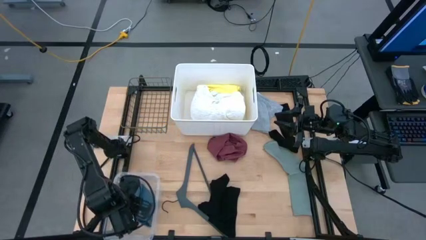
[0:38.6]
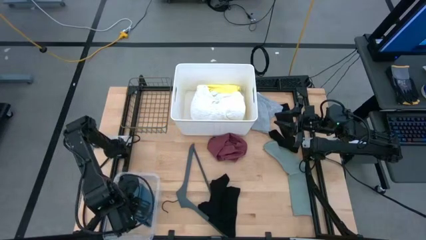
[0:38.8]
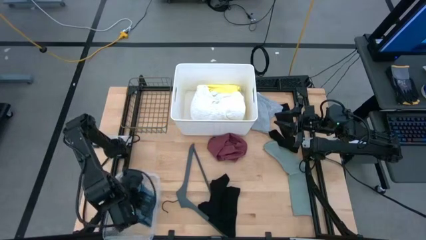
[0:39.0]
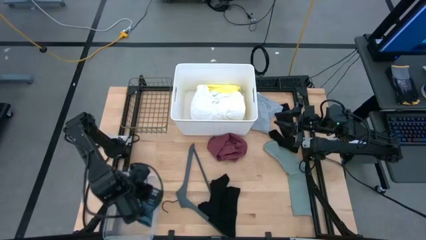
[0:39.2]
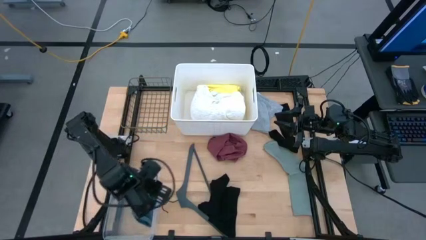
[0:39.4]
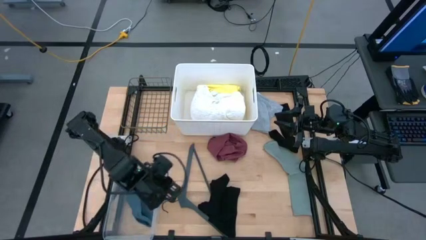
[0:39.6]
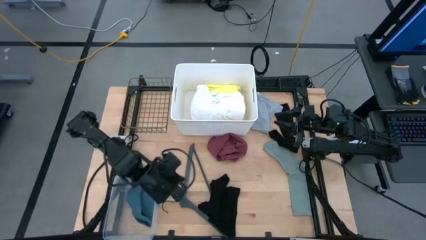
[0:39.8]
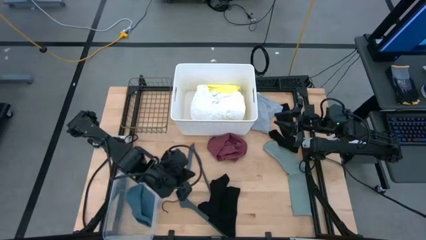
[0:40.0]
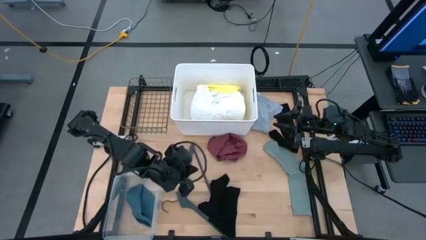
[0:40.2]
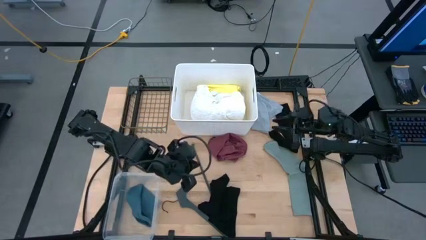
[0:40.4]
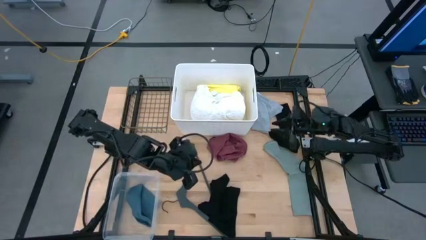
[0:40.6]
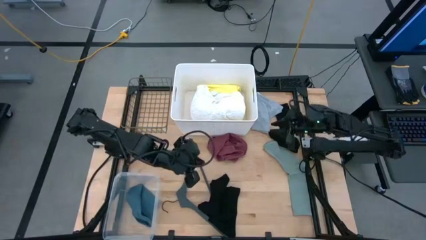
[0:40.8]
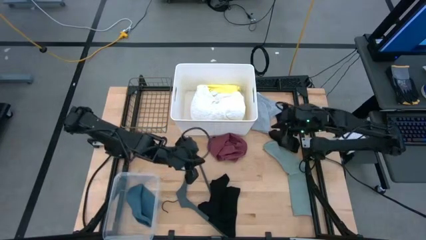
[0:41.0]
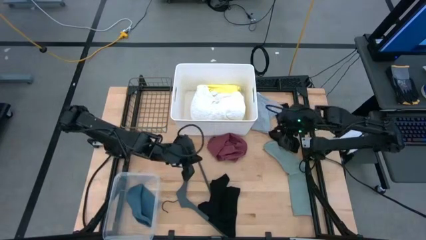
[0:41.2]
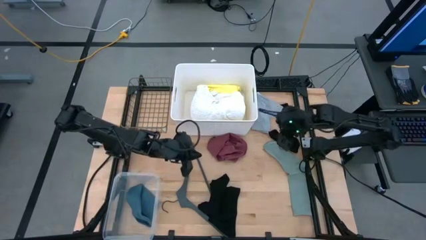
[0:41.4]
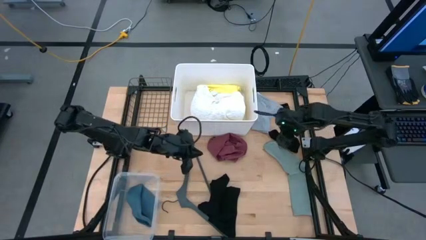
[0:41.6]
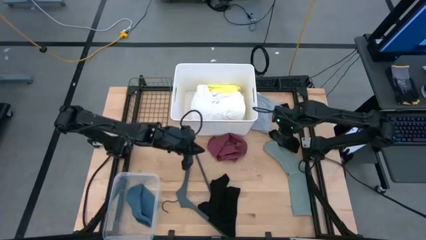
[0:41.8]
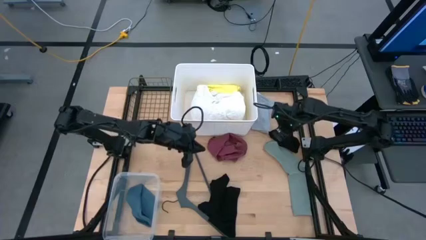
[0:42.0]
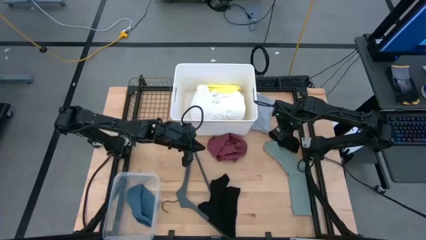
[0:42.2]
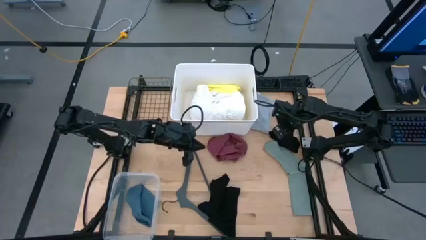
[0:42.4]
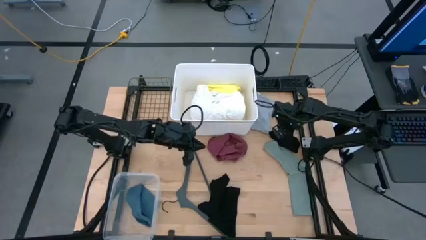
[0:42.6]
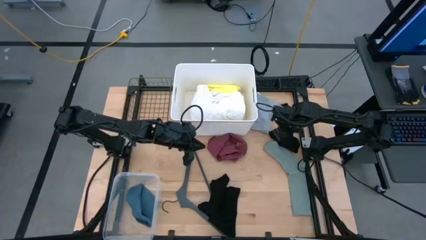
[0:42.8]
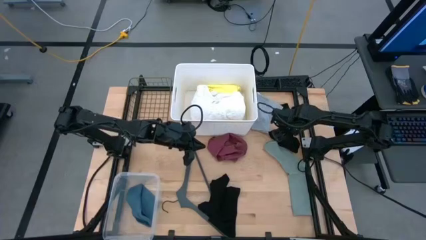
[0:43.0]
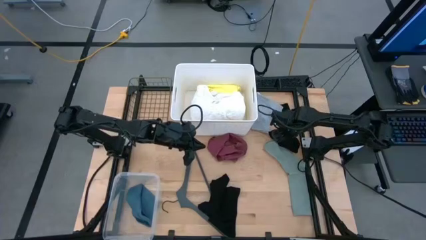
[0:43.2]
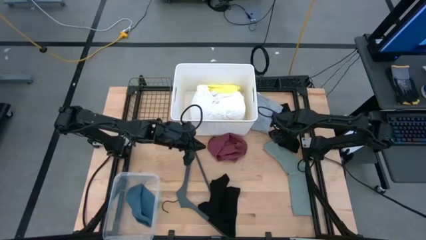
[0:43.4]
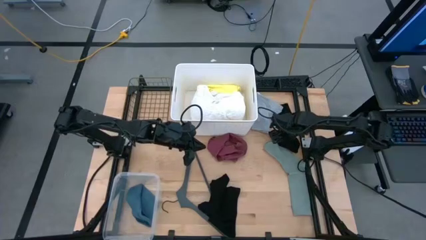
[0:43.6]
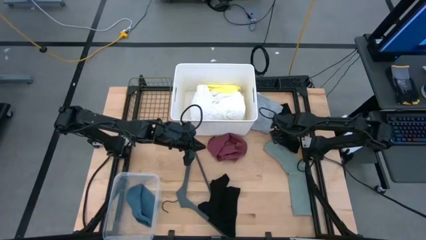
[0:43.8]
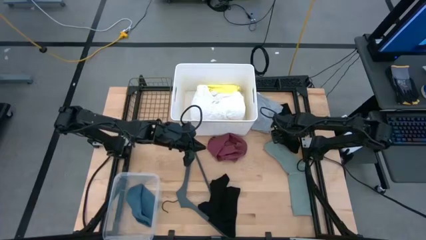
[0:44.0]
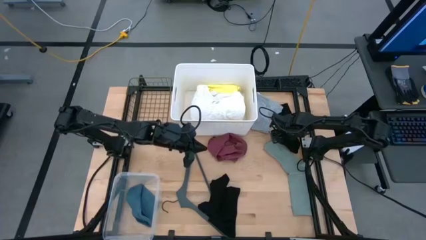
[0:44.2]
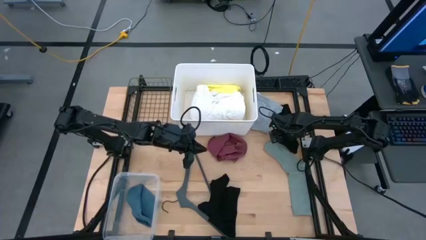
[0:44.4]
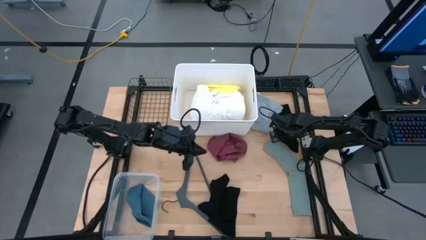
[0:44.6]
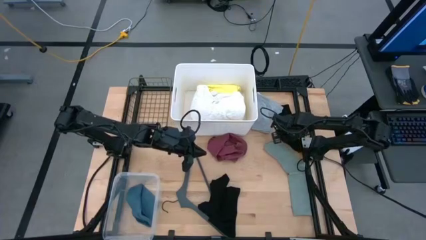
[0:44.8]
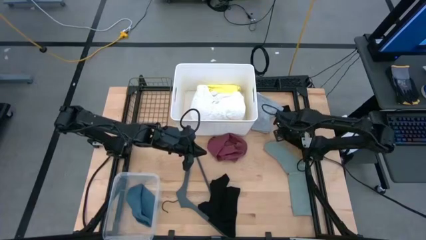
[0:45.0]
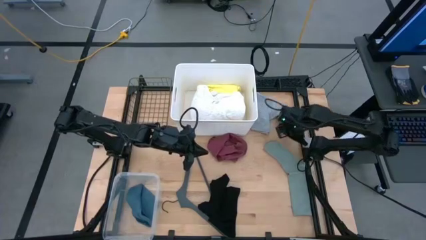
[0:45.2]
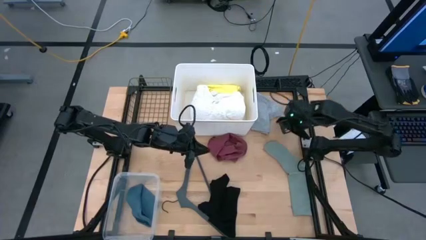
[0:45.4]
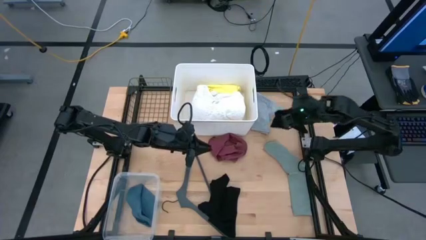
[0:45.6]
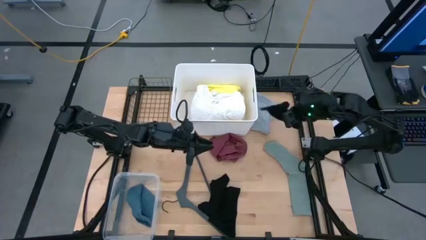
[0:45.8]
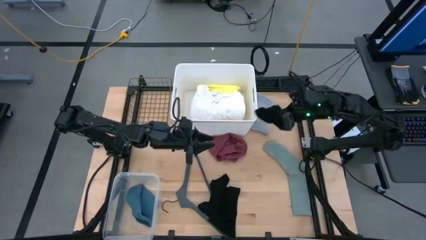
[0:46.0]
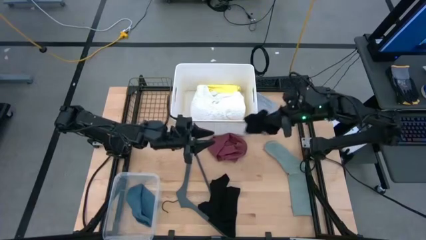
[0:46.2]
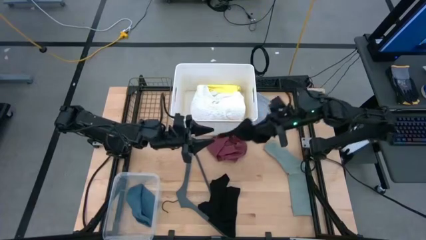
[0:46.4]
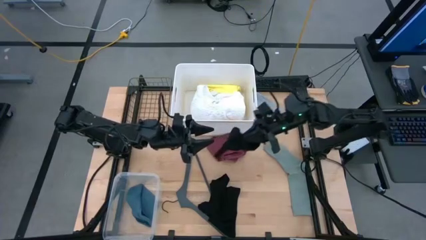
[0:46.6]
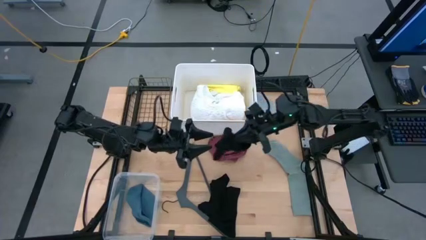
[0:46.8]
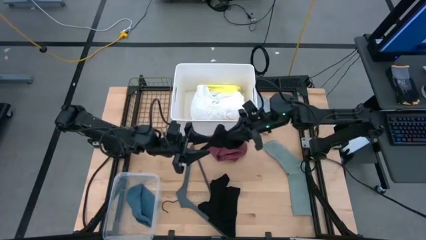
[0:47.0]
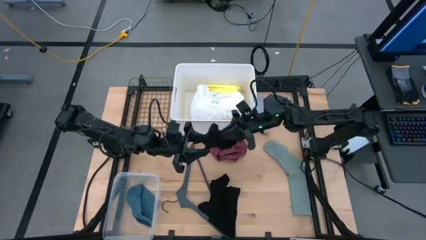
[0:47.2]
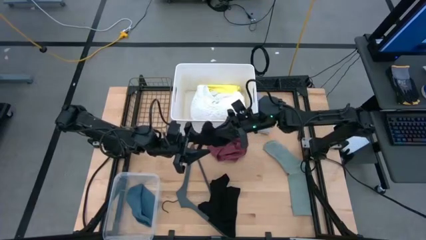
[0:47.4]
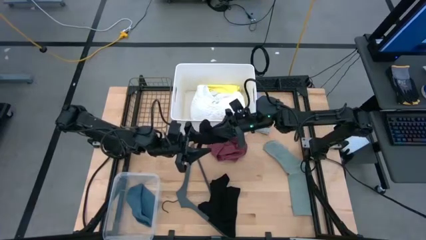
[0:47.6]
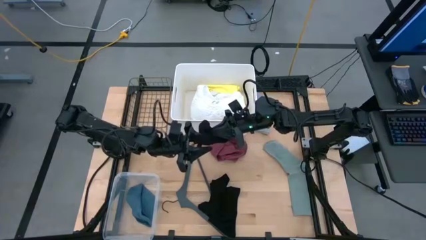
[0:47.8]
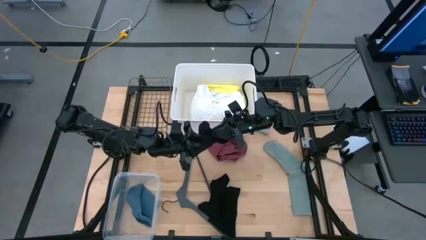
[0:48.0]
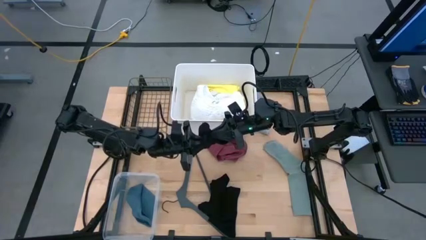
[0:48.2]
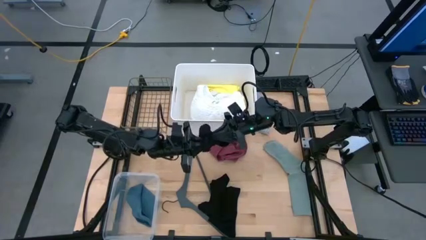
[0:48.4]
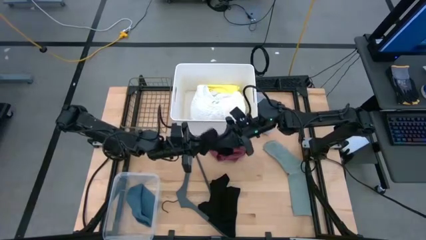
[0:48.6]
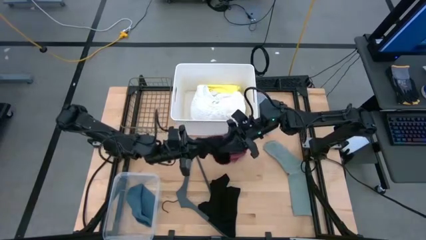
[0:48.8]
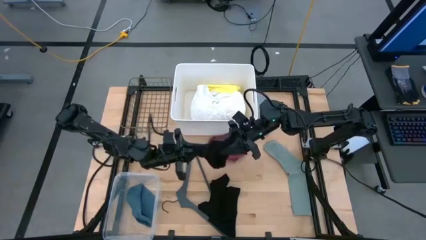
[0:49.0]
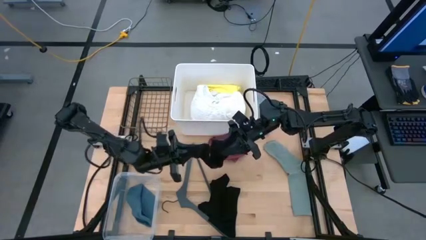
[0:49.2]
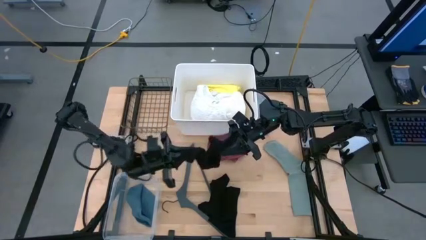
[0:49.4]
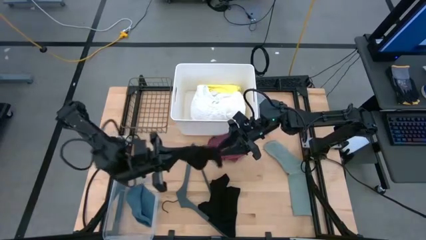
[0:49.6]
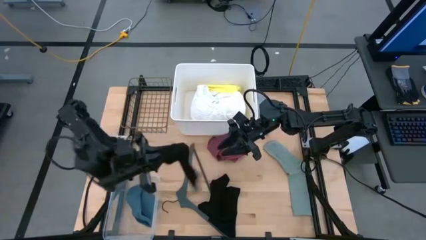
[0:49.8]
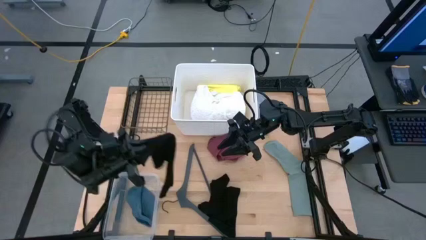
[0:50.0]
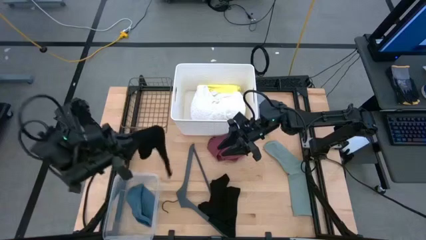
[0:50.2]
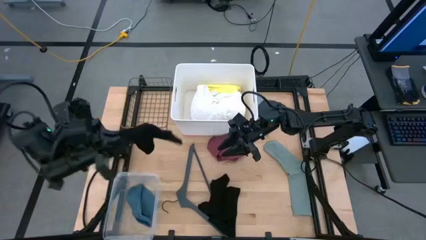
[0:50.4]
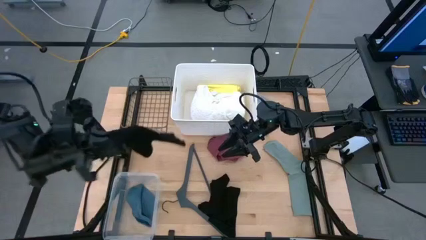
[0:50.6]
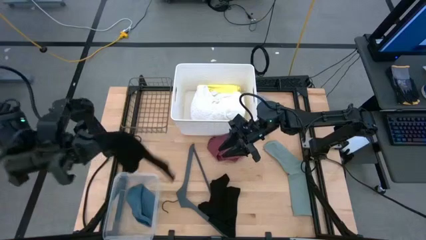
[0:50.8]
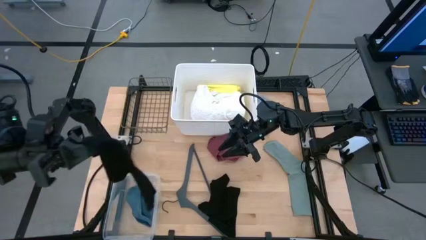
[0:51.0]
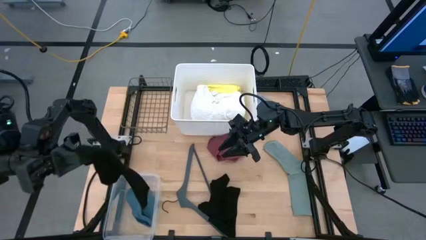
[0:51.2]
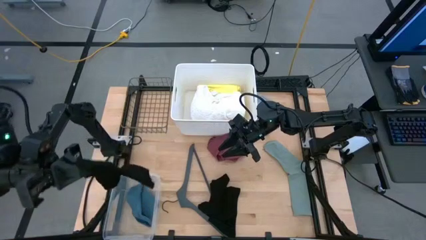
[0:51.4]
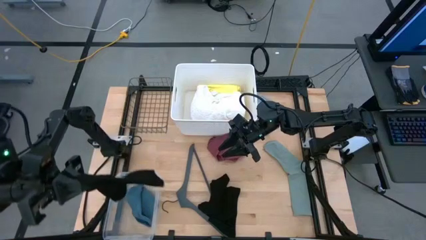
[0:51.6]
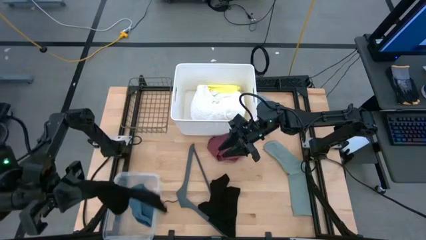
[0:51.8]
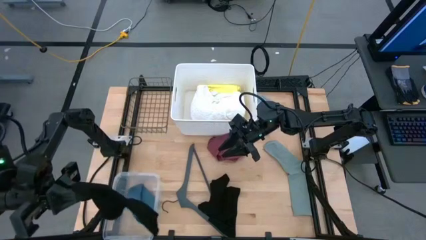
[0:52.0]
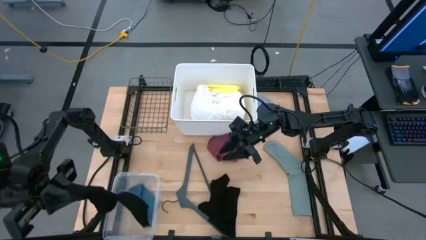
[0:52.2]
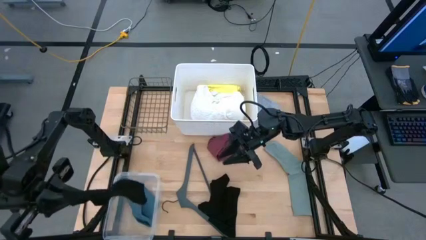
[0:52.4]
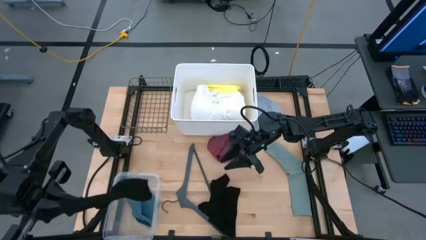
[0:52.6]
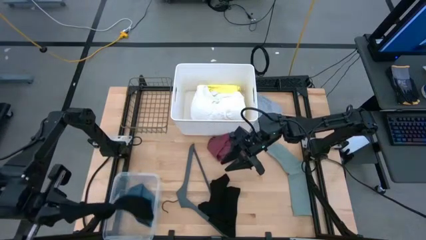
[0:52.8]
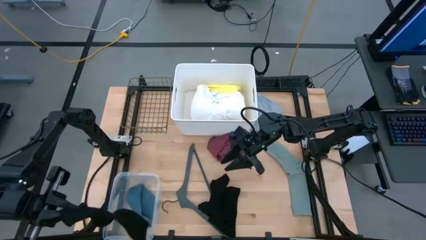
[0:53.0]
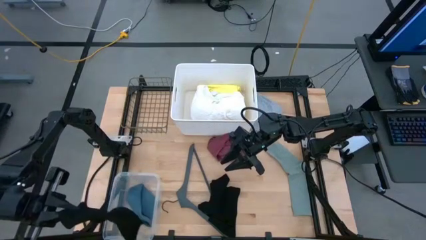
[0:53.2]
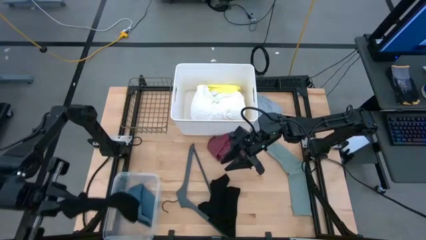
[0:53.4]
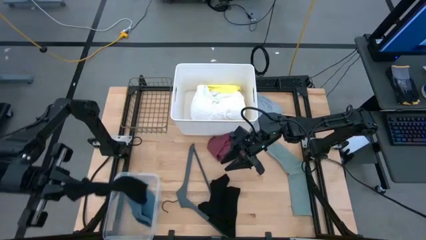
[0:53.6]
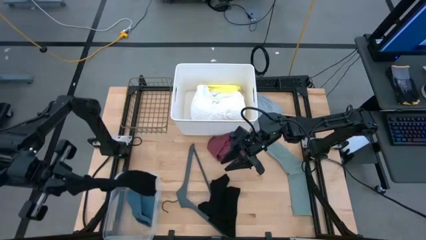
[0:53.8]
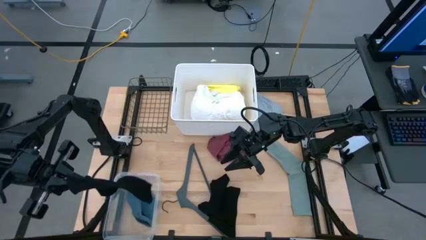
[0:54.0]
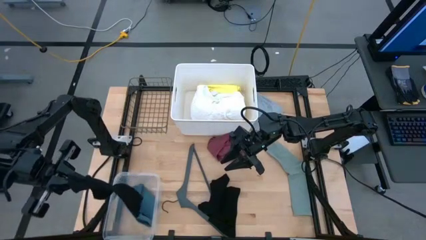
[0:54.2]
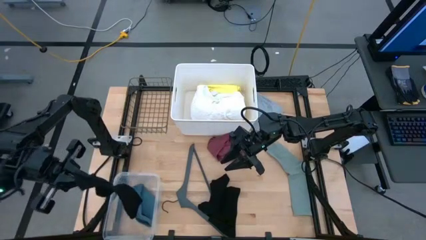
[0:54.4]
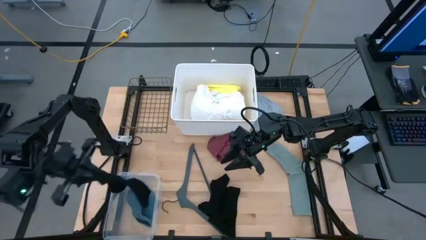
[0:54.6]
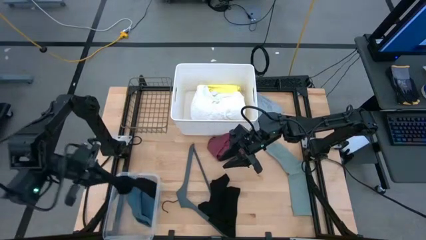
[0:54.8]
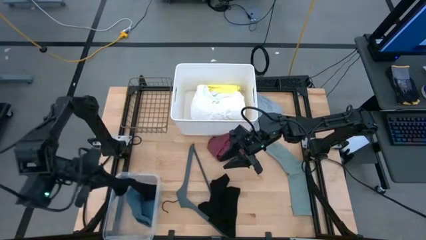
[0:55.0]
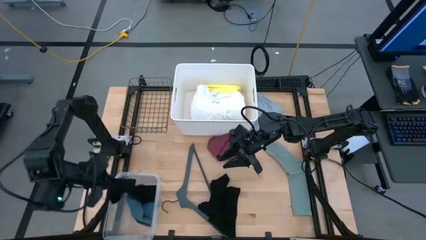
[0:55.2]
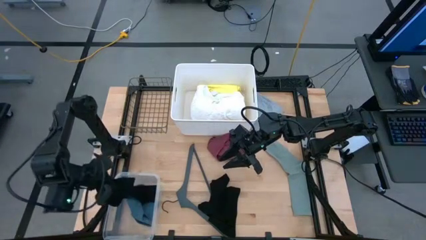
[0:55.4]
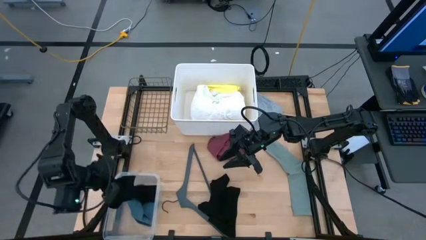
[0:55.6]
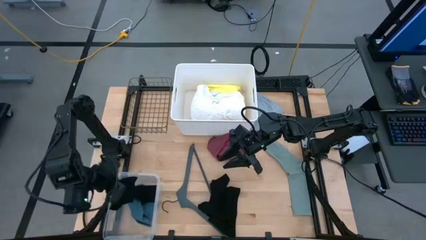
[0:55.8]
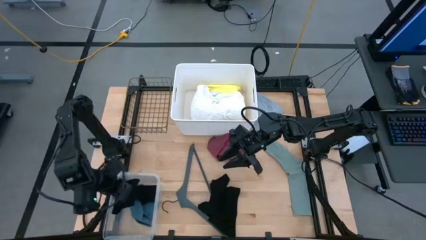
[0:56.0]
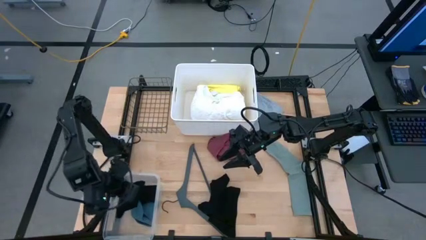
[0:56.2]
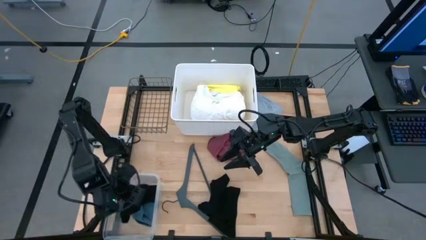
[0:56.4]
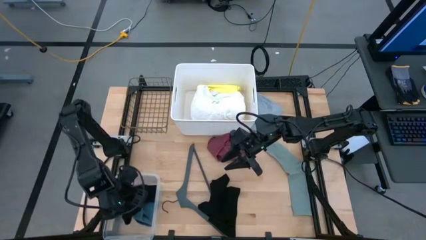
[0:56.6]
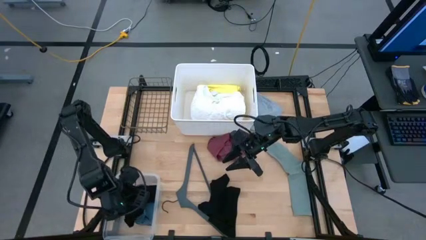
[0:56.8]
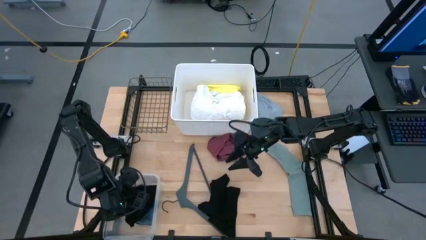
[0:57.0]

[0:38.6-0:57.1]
Task: Pick & Place Cloths
Put the black sock into the transparent bin
